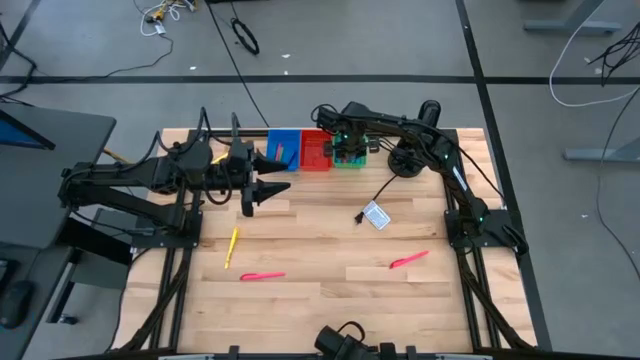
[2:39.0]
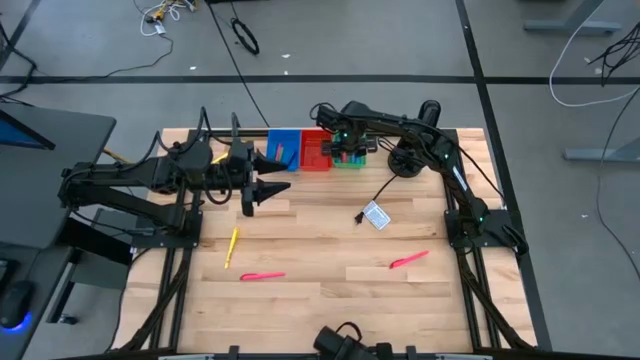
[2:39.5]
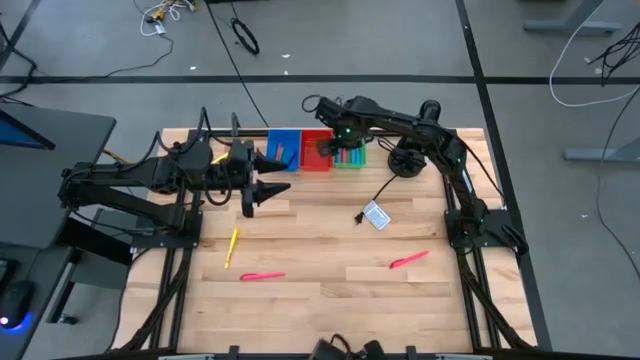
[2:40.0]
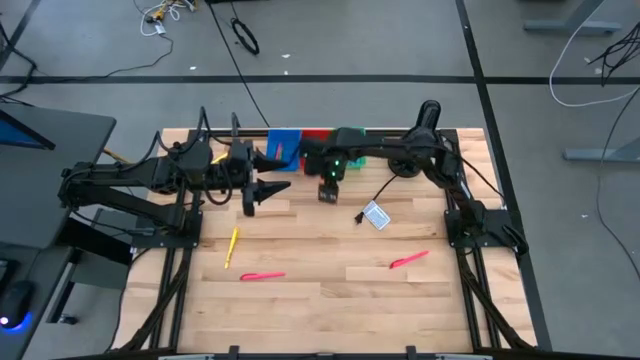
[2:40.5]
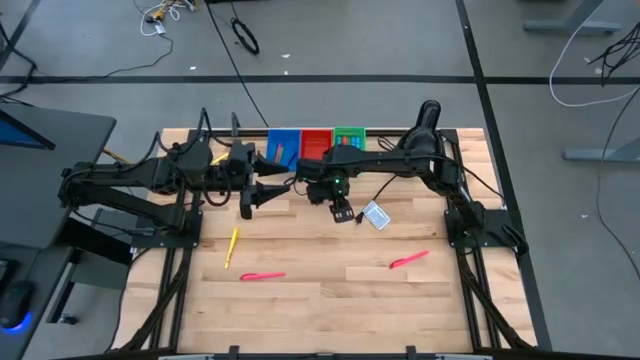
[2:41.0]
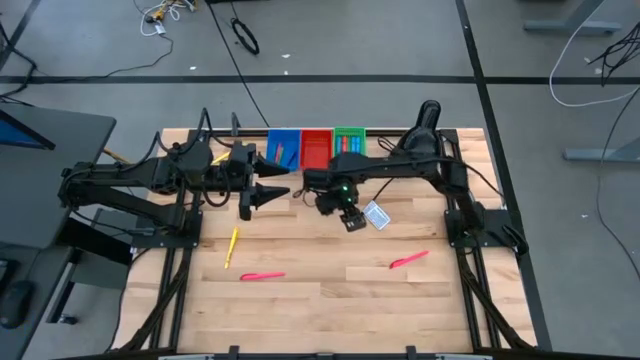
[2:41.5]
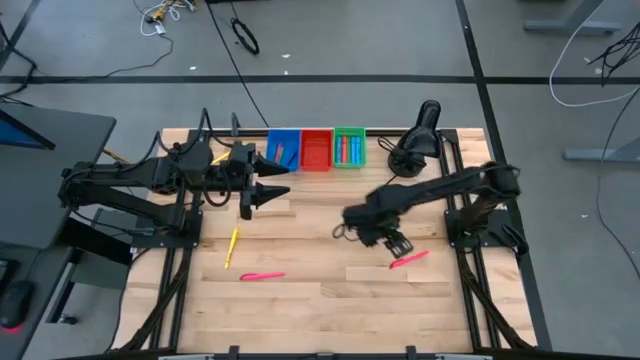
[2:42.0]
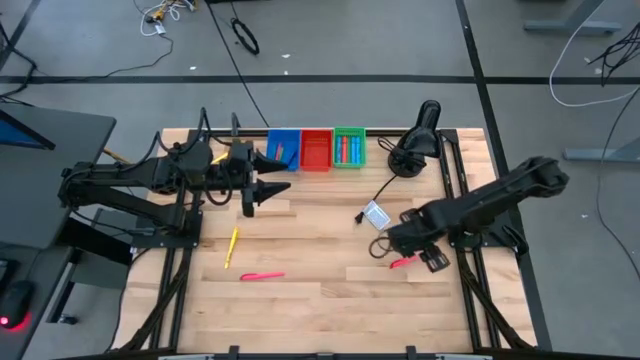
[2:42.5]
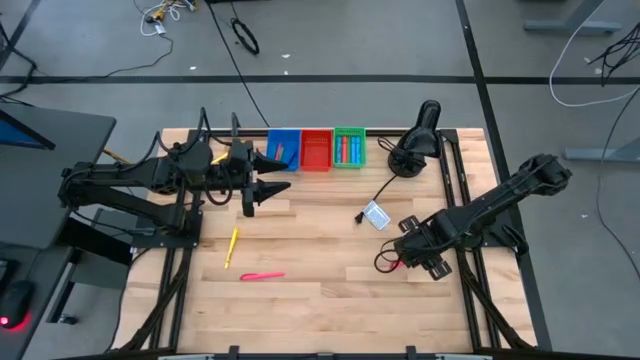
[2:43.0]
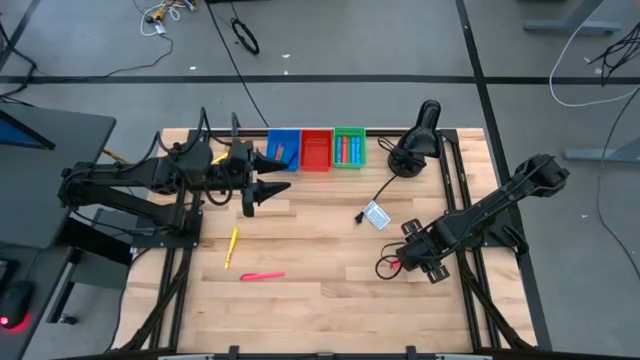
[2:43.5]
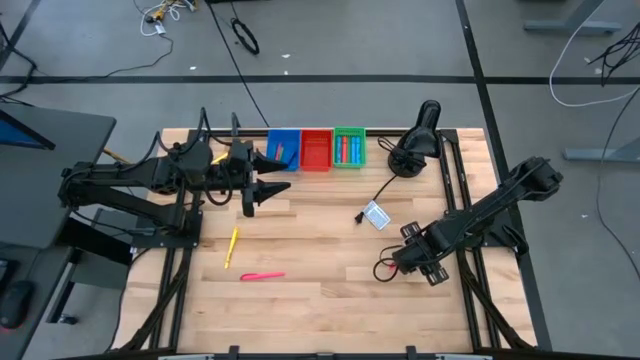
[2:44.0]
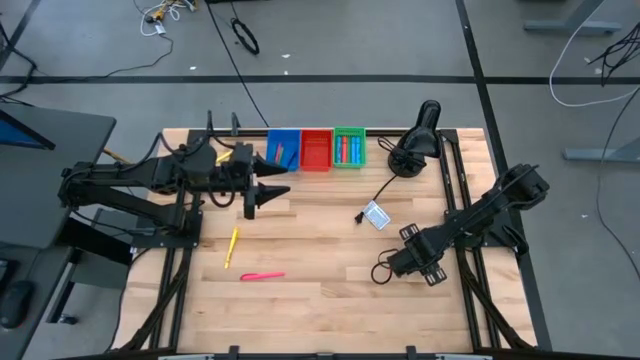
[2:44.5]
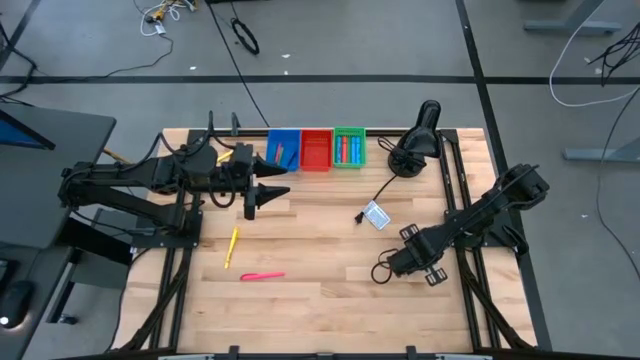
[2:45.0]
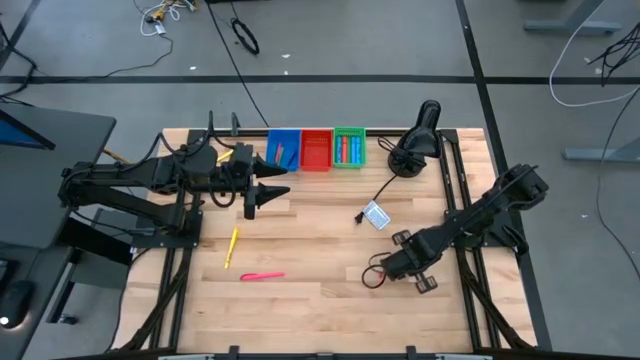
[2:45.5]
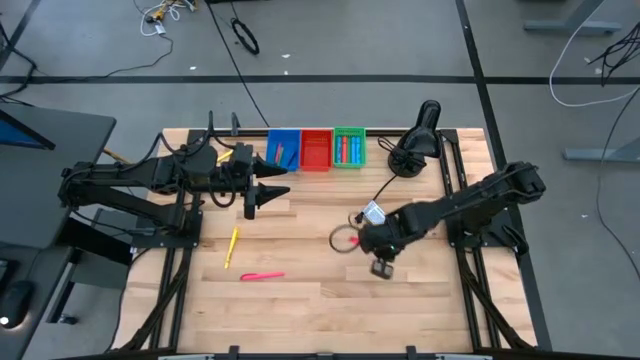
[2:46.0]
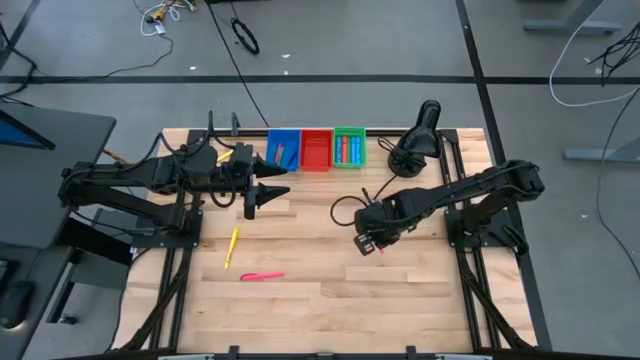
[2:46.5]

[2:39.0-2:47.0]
Task: Pick & Place Markers
Put the right pink marker into the red bin

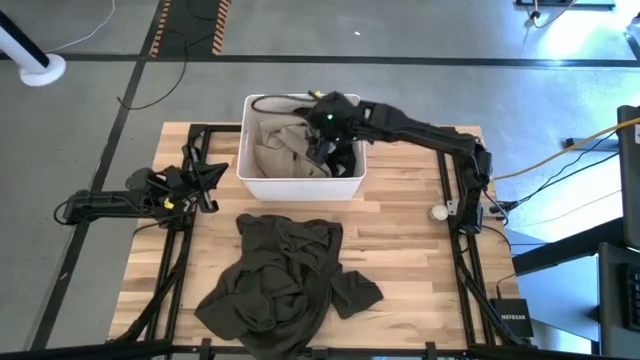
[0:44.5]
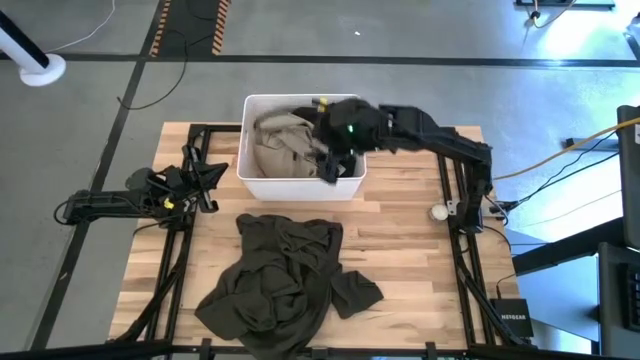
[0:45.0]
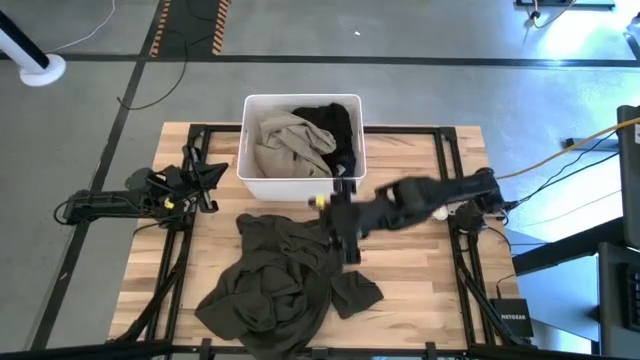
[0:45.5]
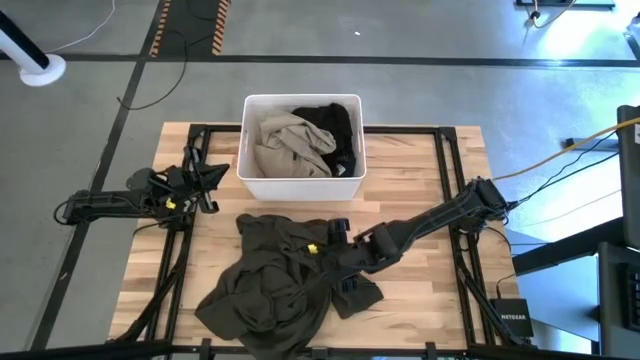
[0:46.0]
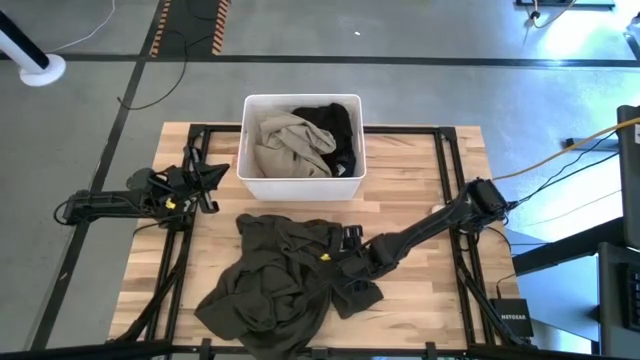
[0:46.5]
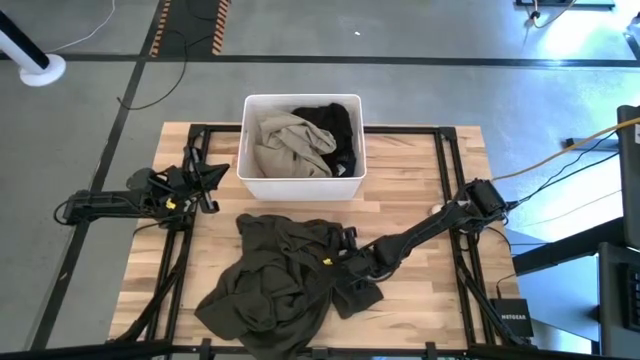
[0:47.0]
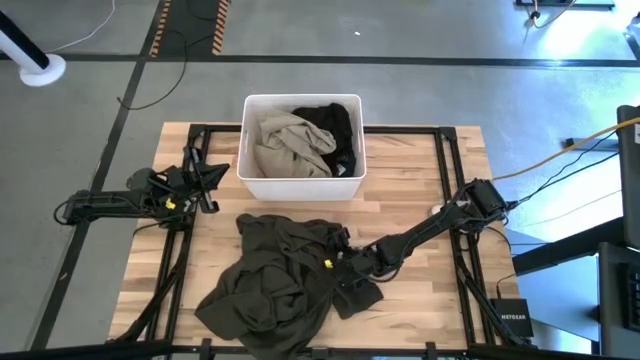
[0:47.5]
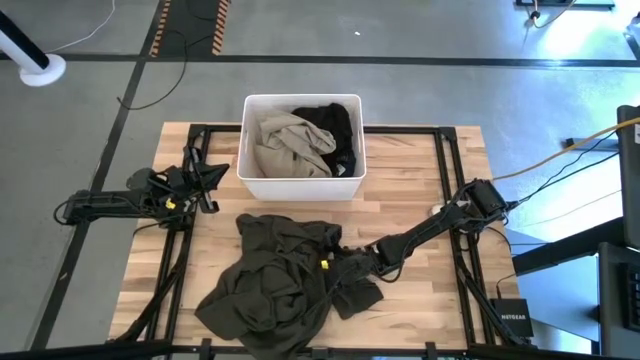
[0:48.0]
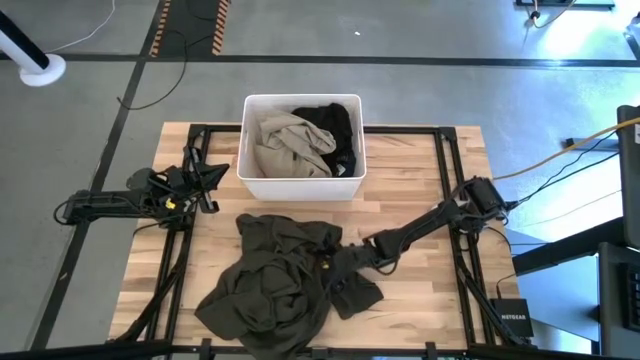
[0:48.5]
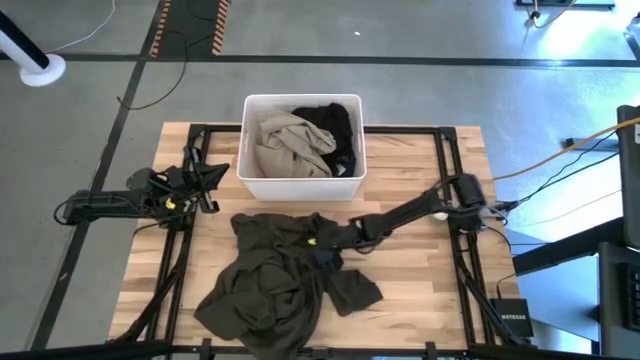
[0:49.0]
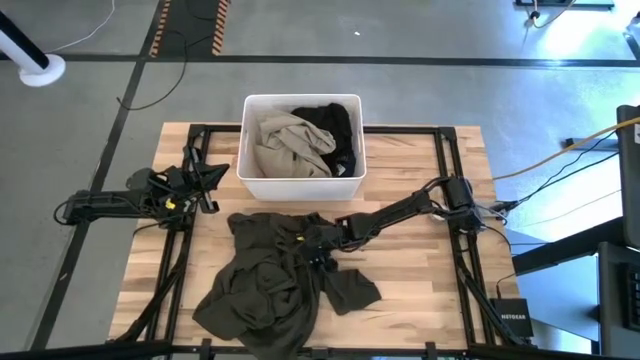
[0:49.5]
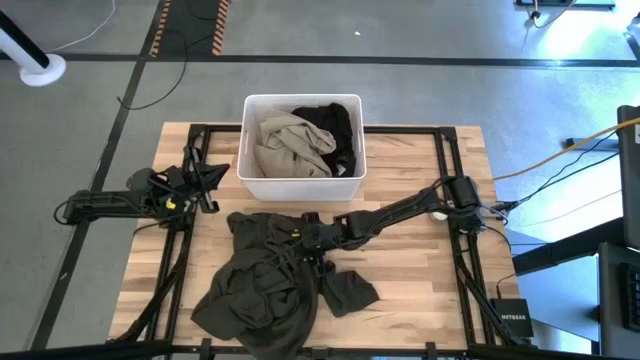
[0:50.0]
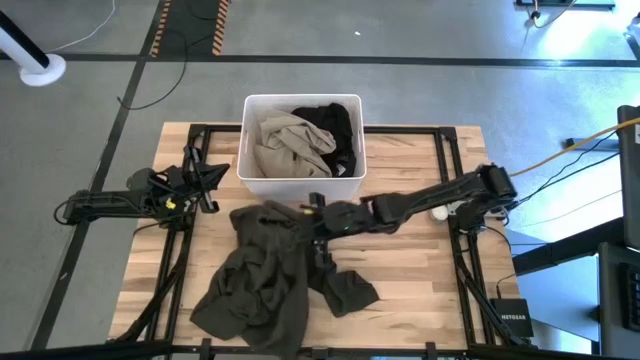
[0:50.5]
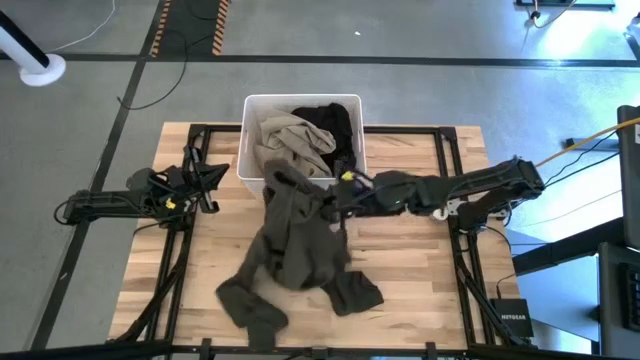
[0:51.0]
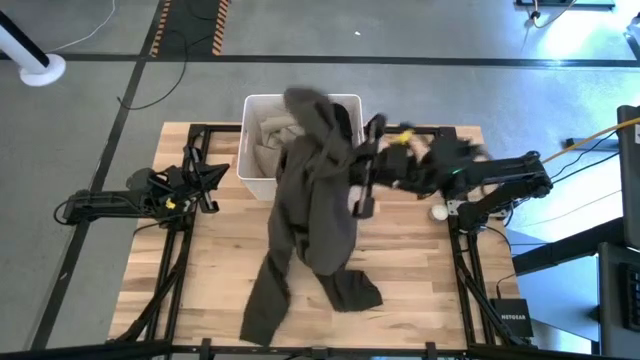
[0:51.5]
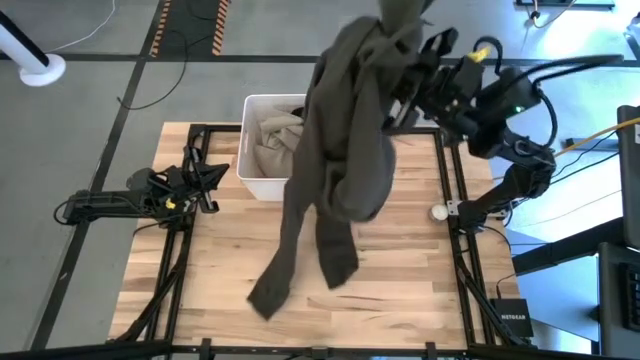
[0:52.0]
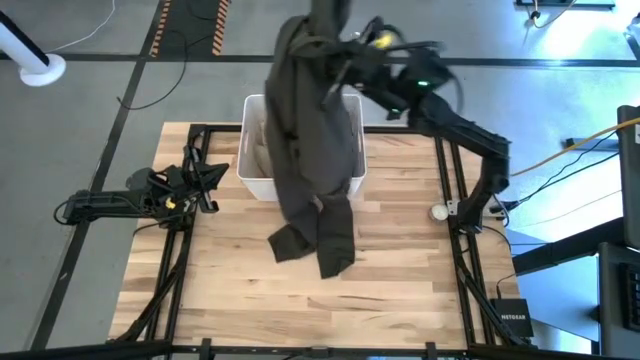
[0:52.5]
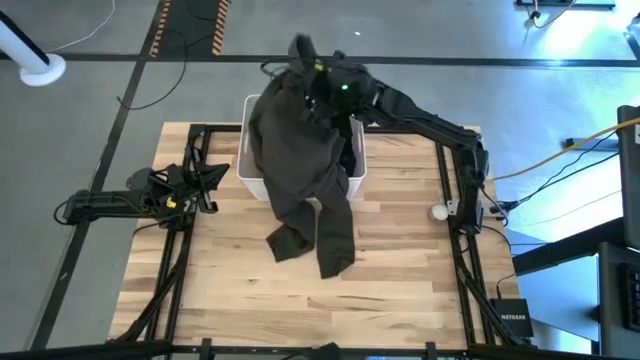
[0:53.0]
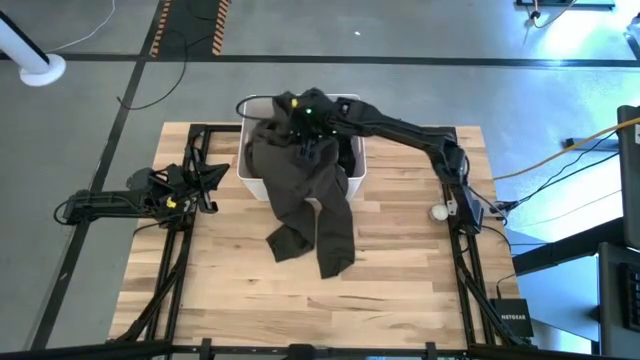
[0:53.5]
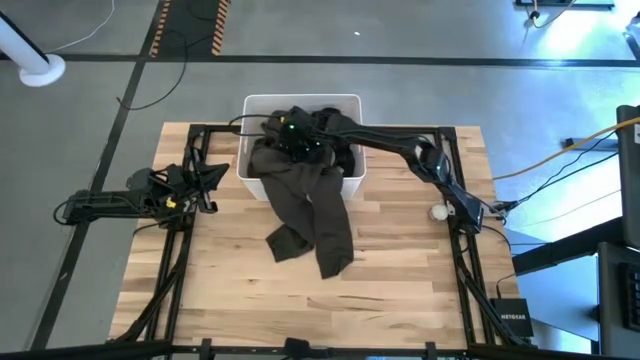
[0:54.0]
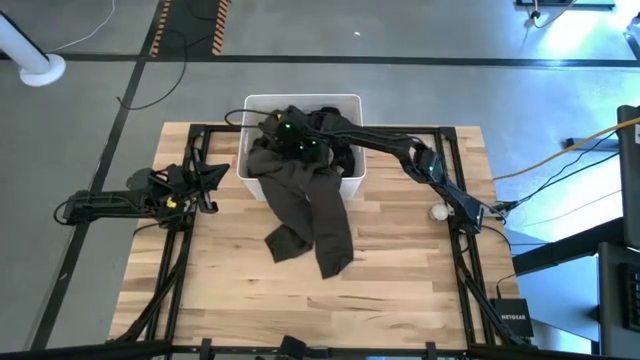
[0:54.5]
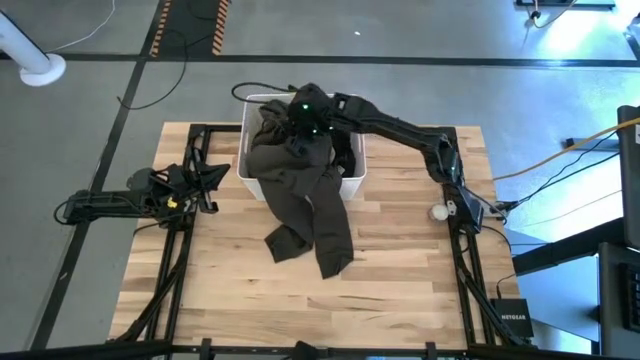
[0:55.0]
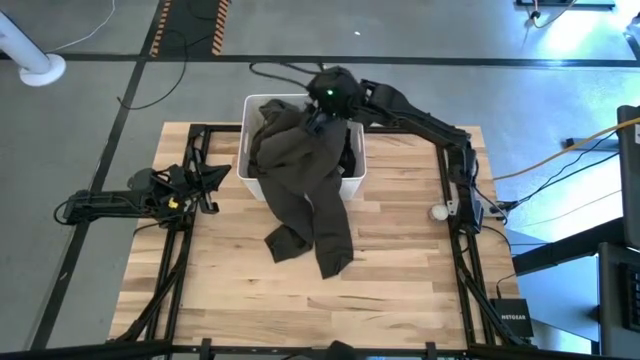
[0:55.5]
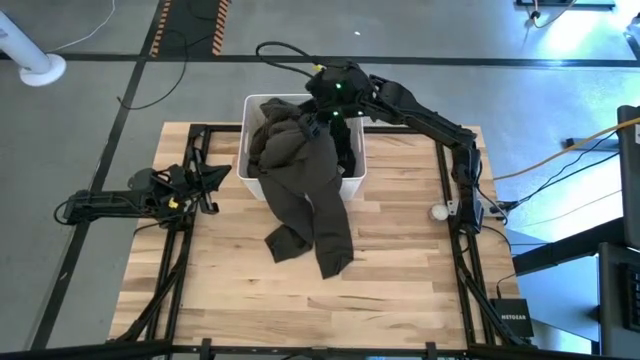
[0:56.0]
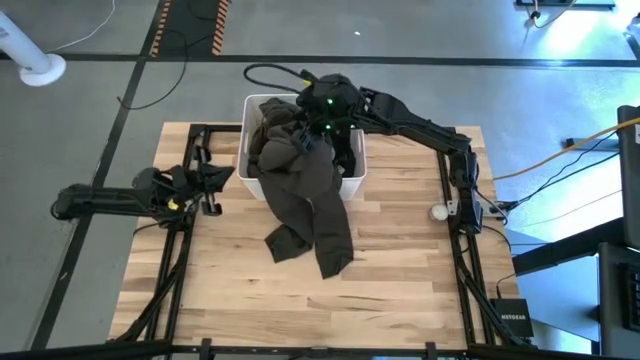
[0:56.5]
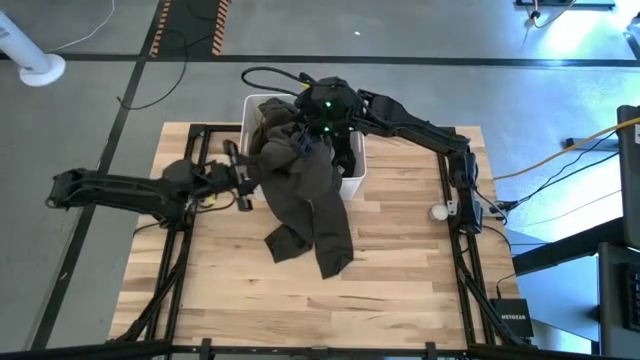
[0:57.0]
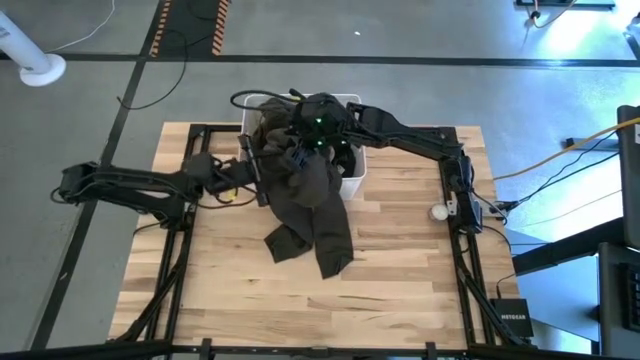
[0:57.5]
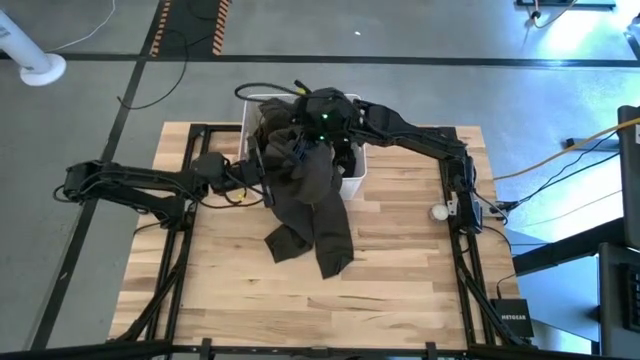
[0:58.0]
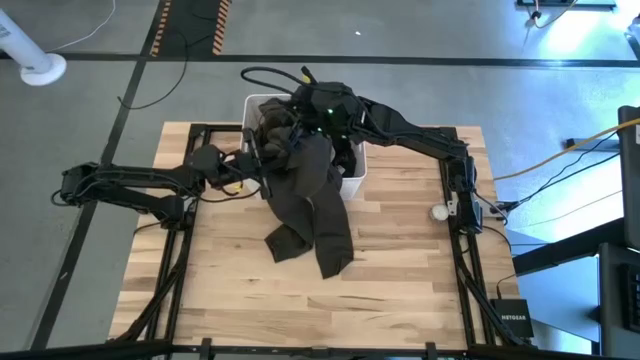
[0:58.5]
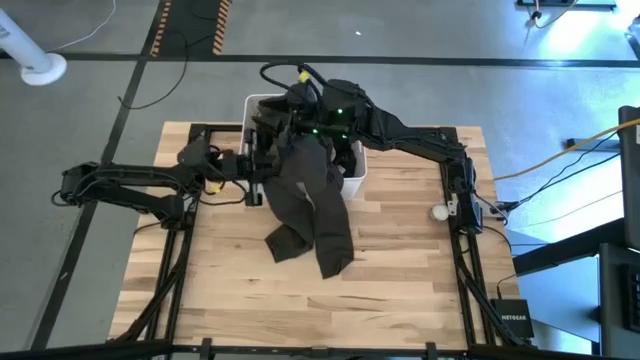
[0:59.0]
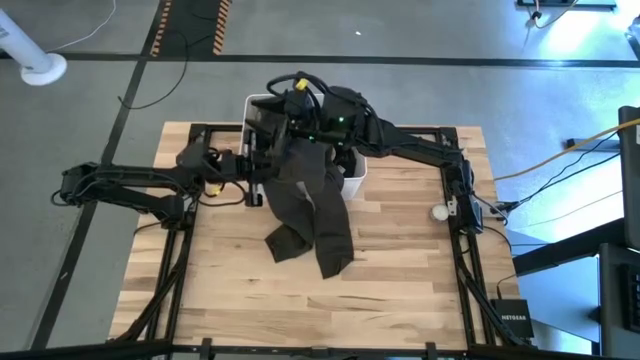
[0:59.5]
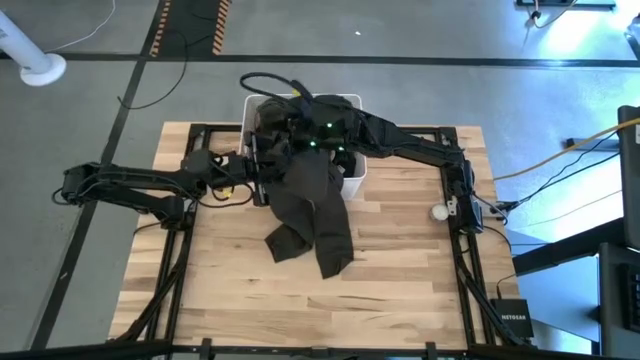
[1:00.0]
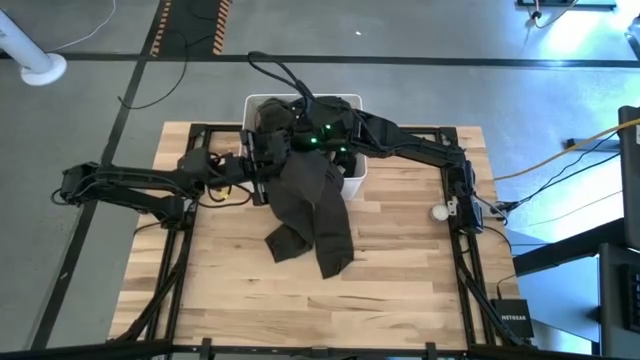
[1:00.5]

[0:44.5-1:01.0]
Task: Sort clothes
Put the gray pants into the white laundry organizer
